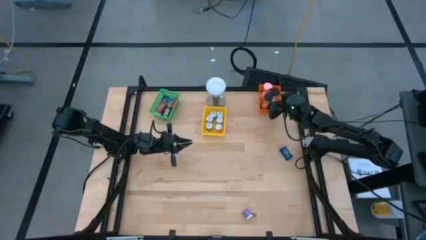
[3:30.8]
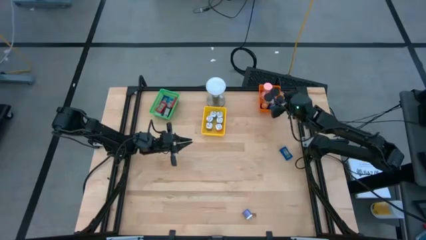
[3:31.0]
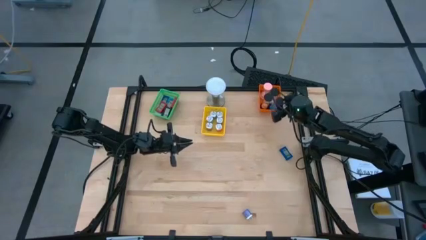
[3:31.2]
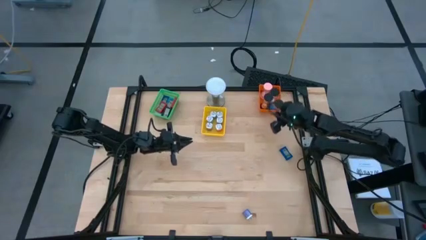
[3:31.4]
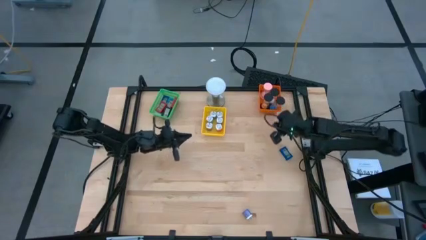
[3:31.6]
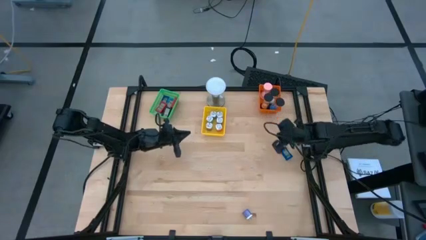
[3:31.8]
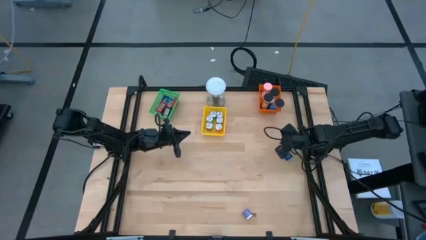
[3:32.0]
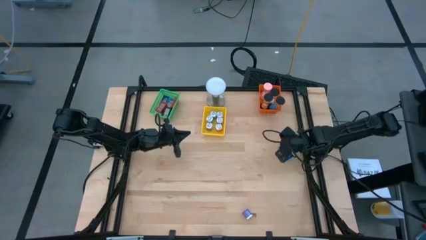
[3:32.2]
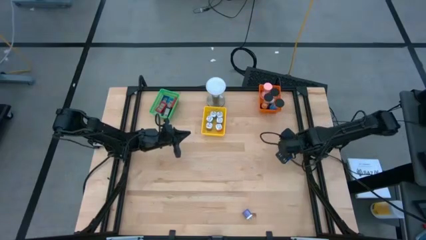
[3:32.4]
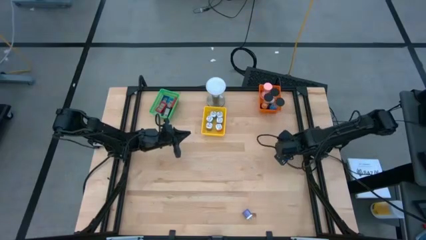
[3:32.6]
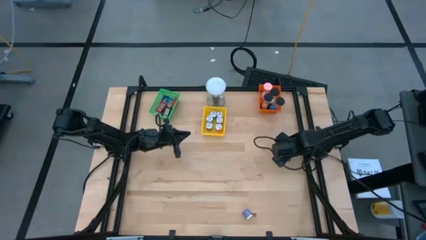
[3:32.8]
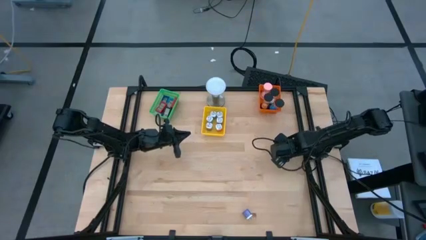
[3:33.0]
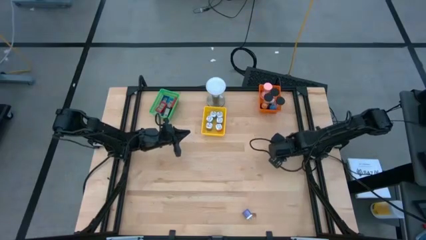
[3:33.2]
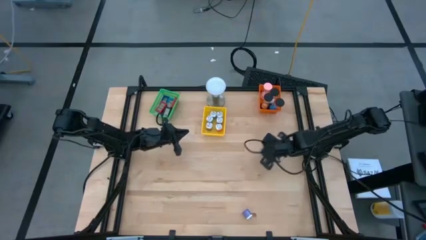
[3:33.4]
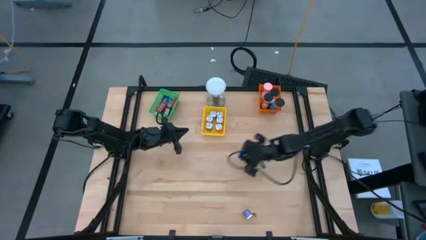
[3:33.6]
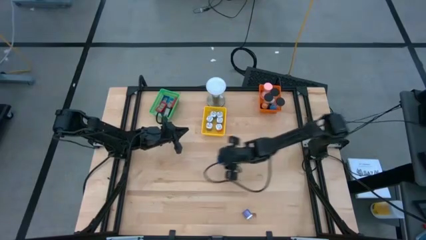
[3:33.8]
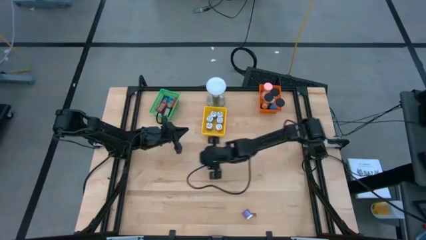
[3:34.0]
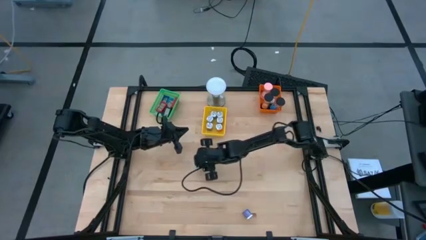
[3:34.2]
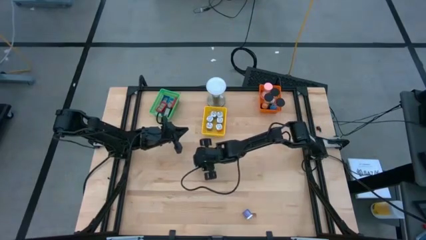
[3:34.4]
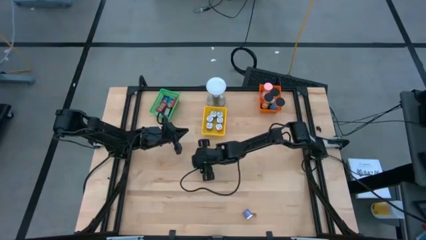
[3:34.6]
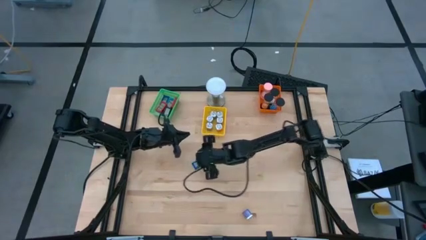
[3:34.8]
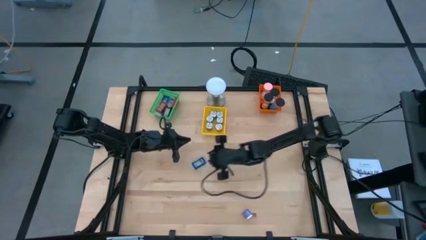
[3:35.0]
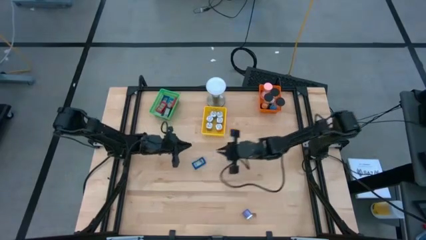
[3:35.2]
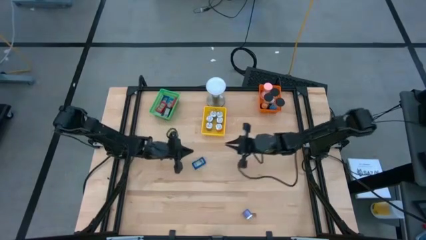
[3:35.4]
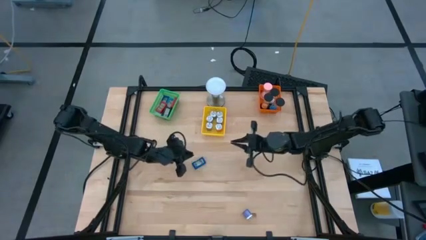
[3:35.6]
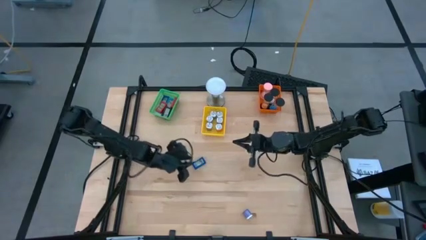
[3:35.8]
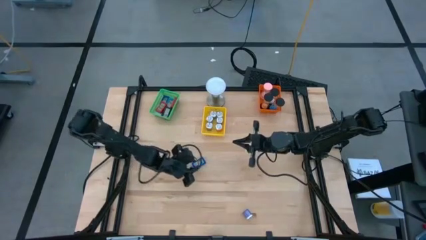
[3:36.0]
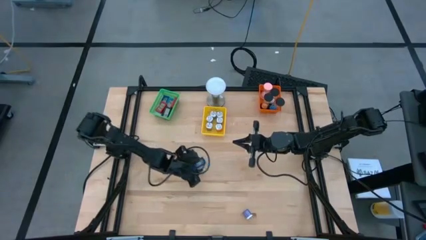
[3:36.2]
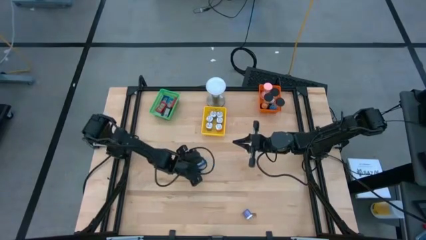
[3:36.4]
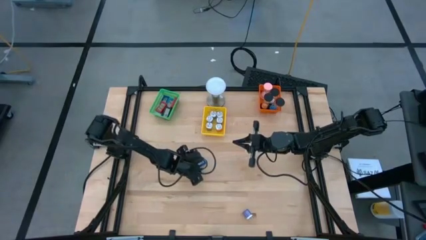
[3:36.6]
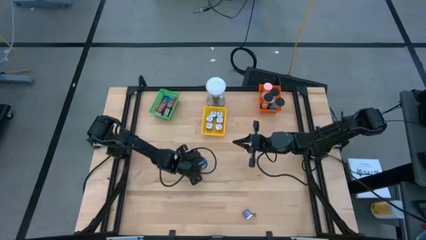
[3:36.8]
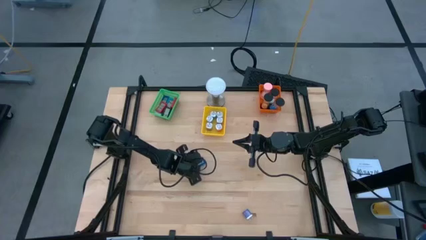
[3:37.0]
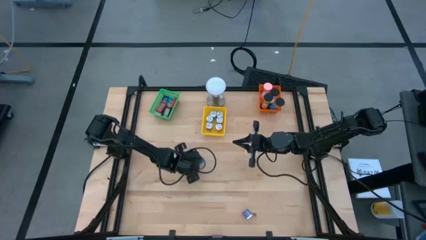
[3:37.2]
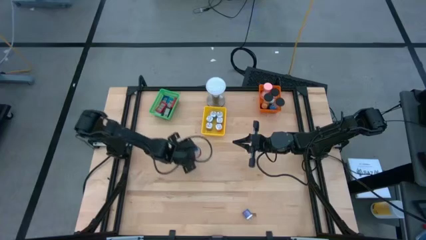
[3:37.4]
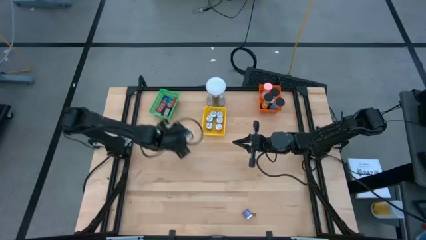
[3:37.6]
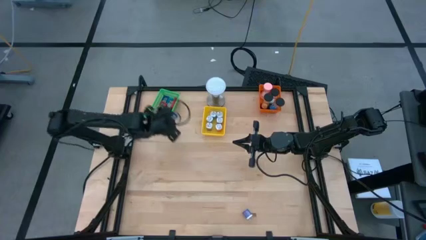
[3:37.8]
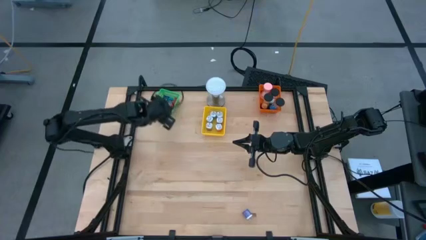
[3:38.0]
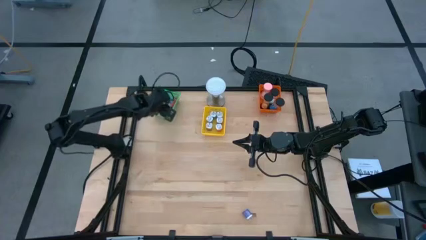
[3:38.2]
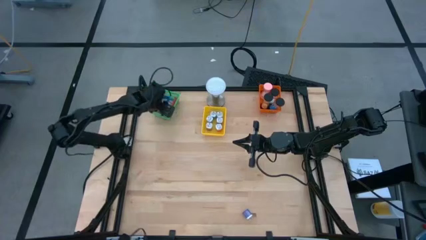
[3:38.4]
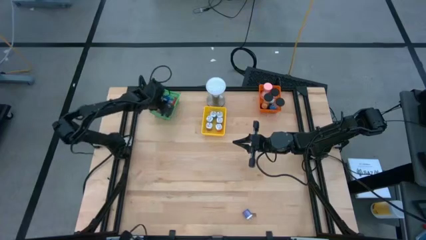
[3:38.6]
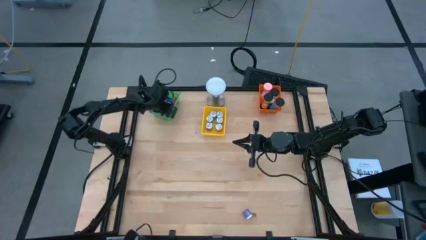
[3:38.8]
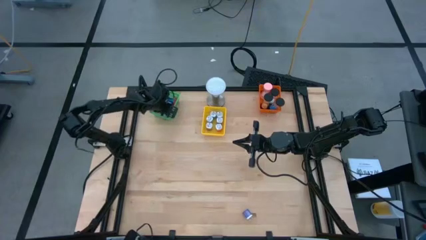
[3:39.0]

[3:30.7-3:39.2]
Task: Pick & Place Office items
Put the blue digital clock into the green bin

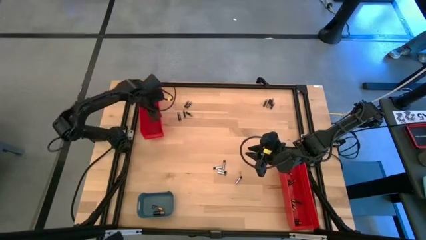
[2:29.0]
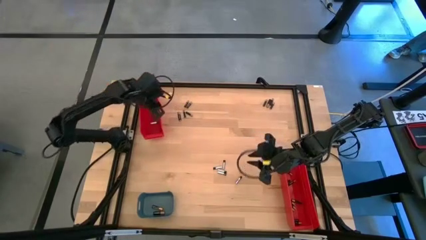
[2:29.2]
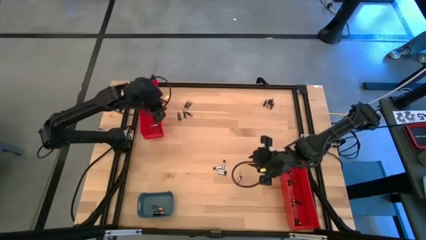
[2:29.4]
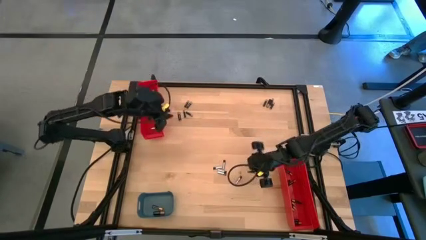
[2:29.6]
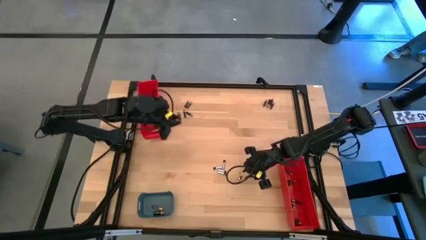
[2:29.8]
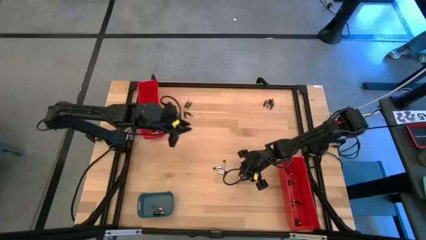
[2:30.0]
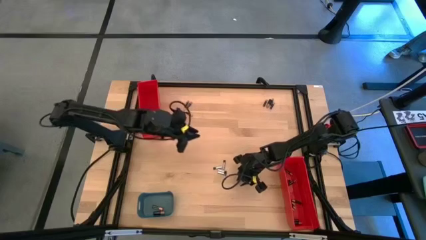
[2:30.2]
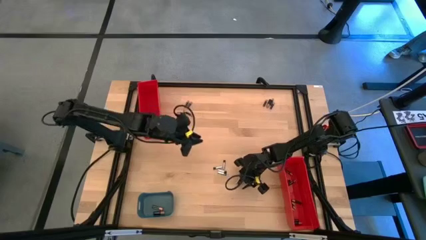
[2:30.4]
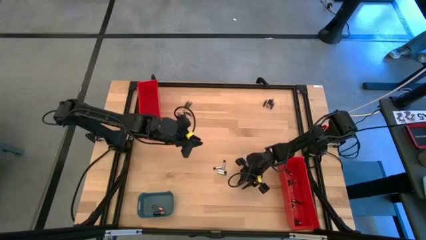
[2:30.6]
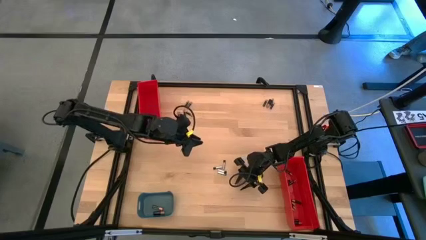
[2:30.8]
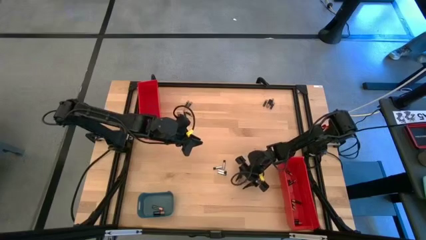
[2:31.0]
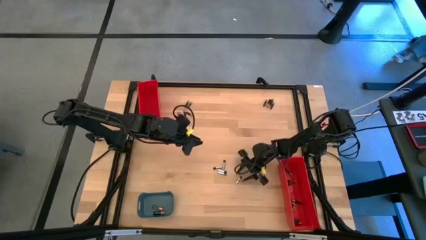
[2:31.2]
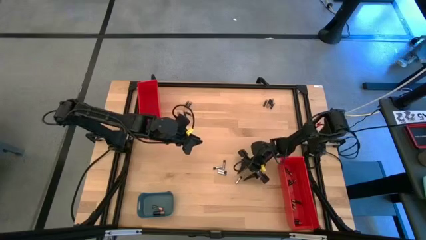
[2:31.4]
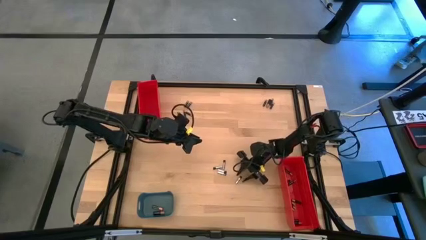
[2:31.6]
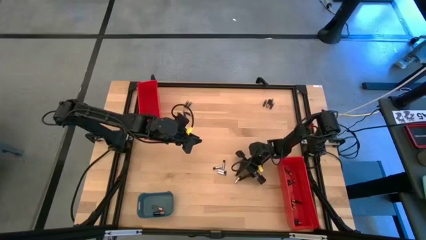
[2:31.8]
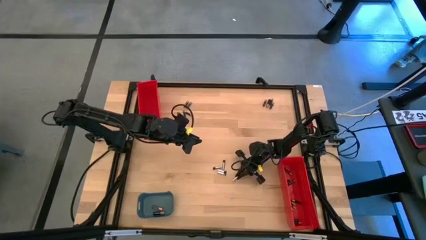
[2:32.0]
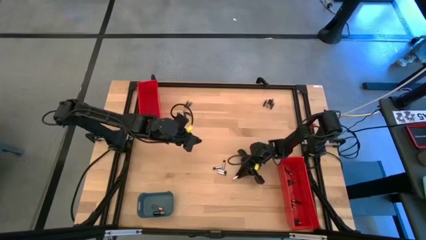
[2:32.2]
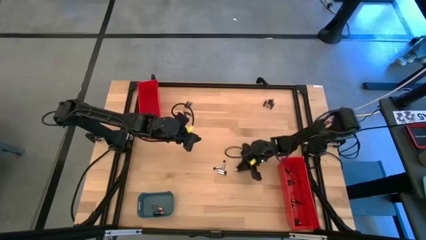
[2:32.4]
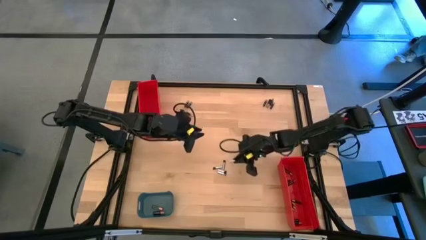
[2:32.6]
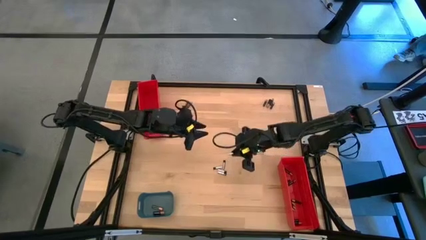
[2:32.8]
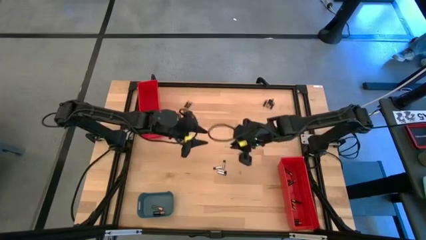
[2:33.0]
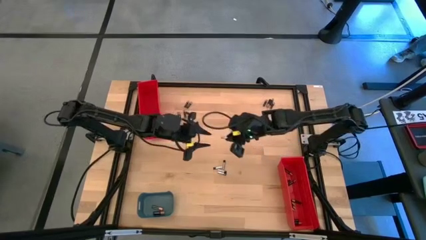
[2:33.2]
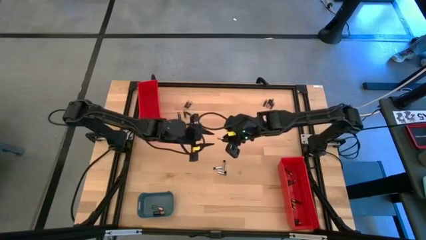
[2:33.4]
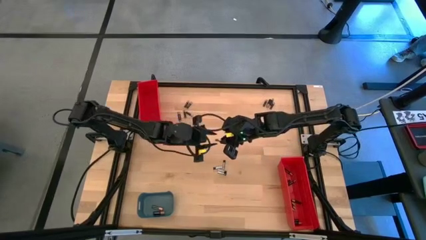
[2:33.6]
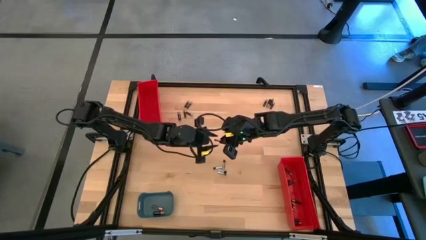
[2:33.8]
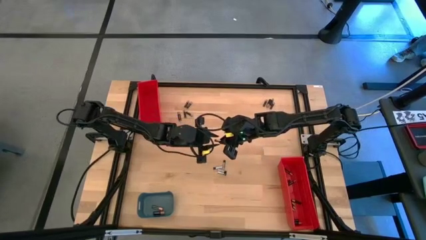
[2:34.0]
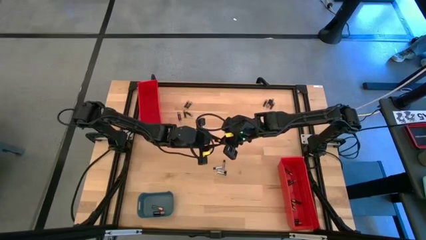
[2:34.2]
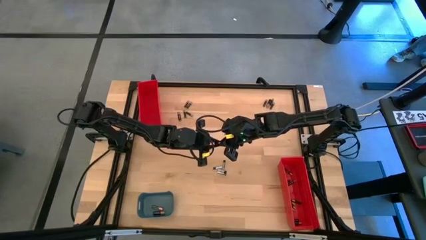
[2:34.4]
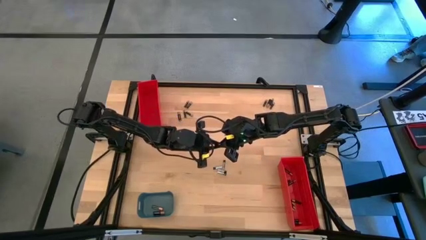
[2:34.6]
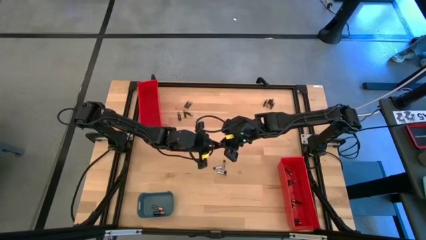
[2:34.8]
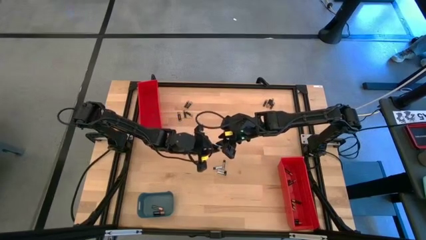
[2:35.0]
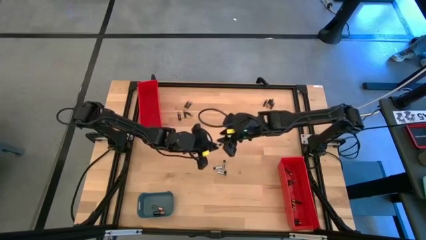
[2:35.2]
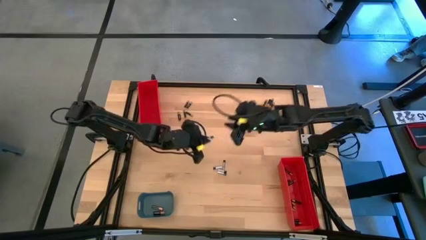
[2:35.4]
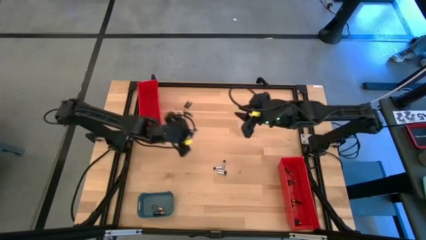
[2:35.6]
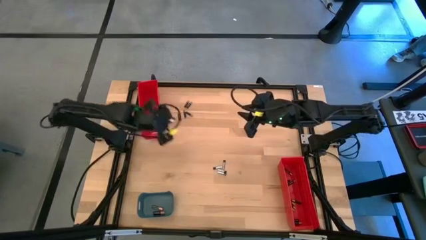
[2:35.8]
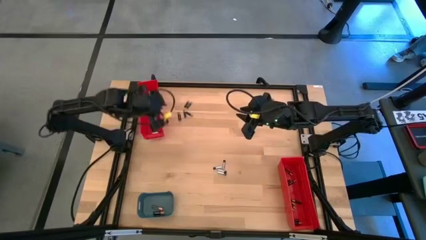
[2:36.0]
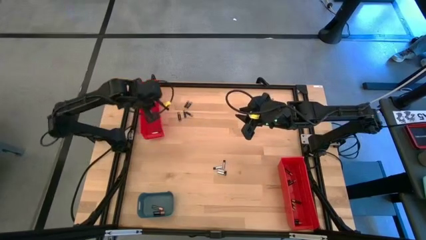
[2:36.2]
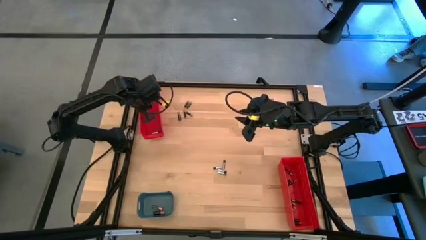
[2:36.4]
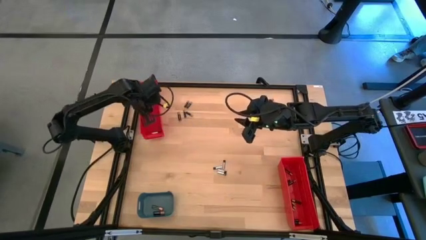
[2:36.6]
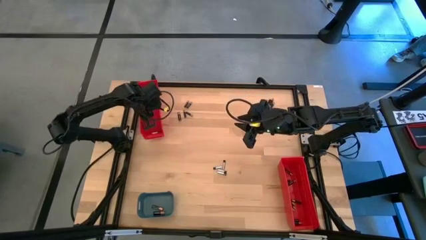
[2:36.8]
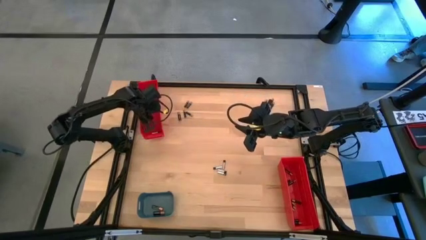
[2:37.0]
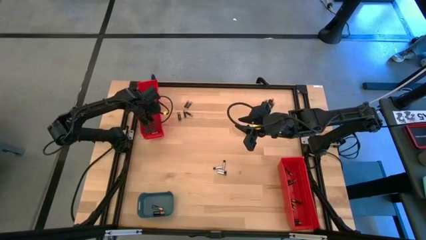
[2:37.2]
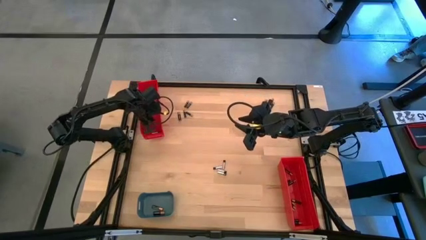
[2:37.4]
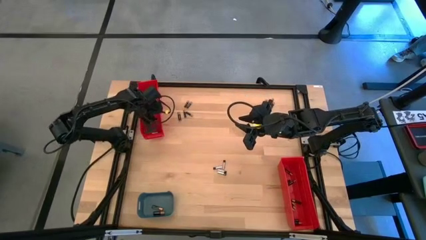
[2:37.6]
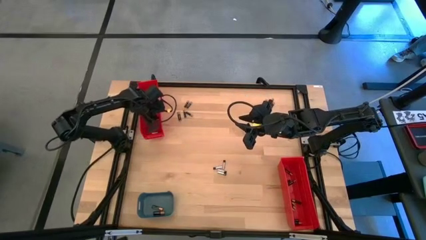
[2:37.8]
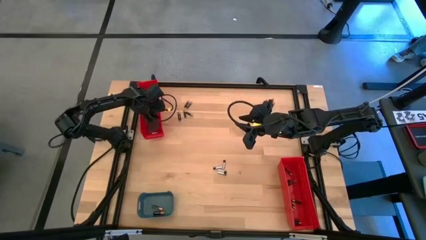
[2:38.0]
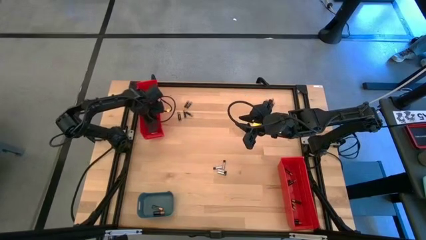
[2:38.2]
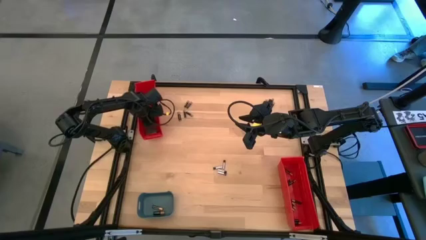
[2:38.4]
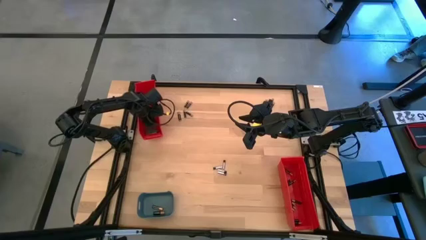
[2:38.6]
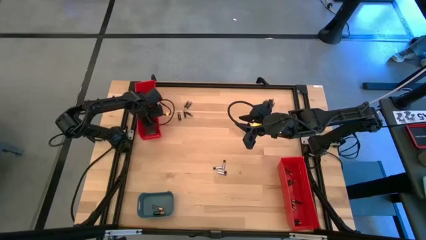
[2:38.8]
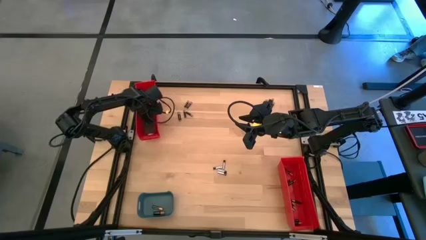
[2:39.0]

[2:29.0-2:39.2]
Task: Sort batteries
Put the silver battery into the top red bin
